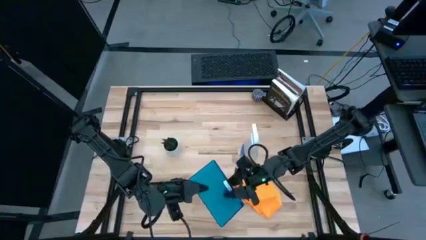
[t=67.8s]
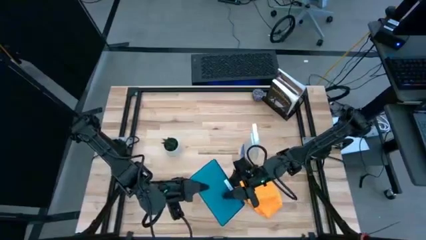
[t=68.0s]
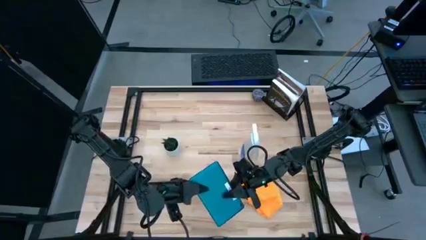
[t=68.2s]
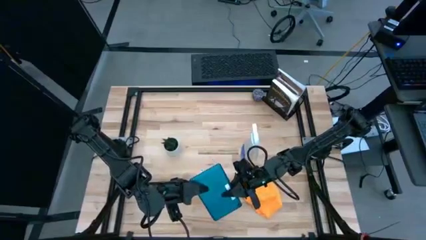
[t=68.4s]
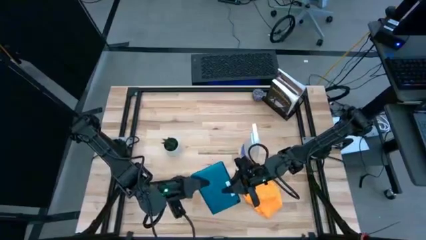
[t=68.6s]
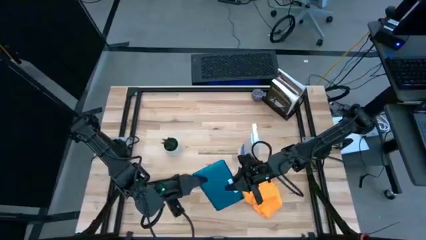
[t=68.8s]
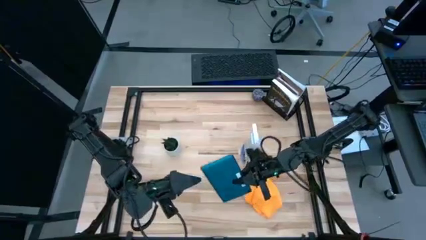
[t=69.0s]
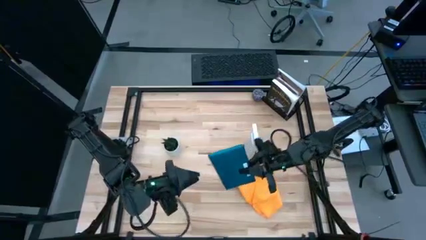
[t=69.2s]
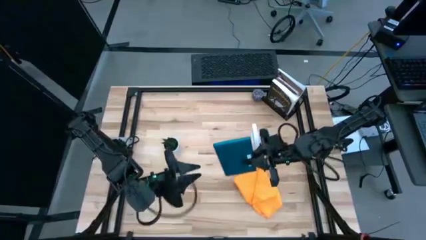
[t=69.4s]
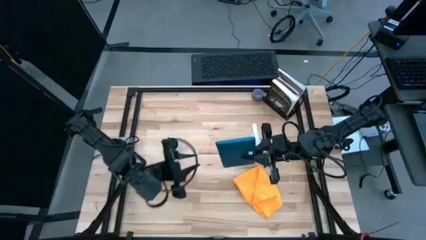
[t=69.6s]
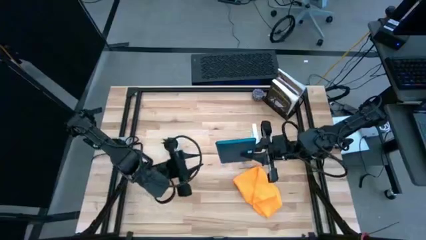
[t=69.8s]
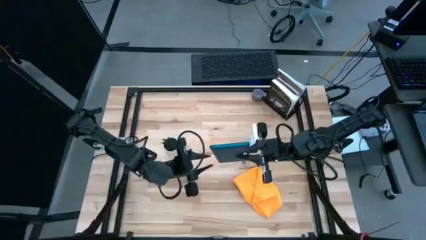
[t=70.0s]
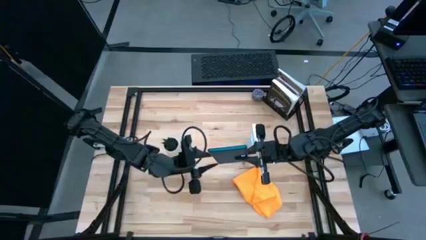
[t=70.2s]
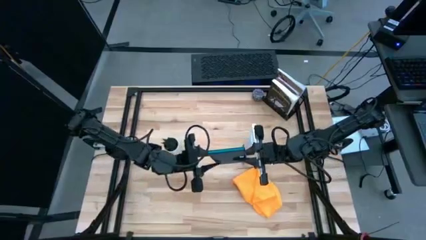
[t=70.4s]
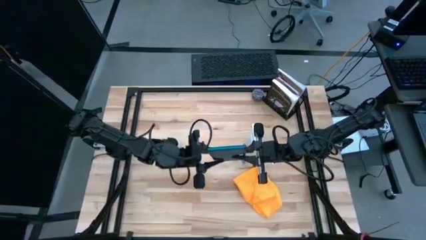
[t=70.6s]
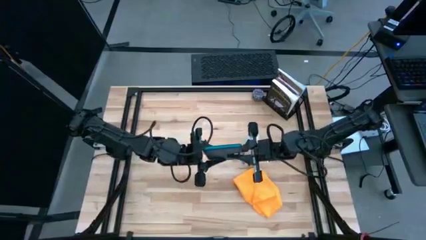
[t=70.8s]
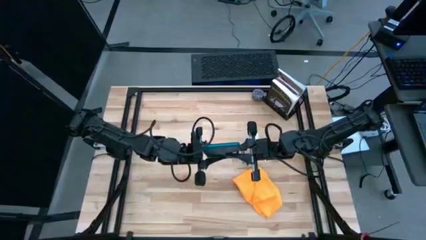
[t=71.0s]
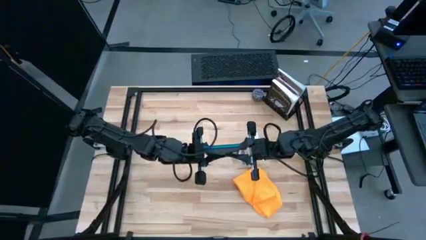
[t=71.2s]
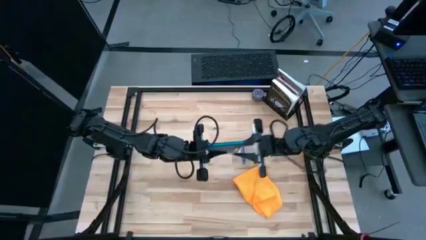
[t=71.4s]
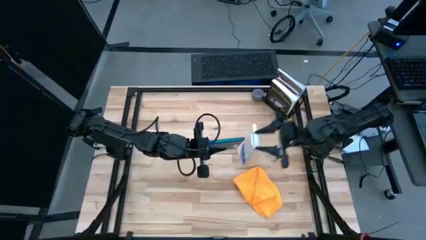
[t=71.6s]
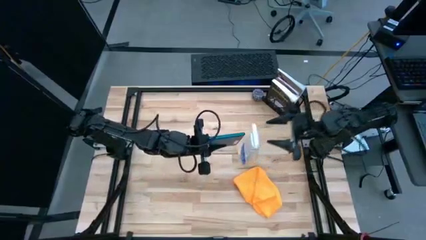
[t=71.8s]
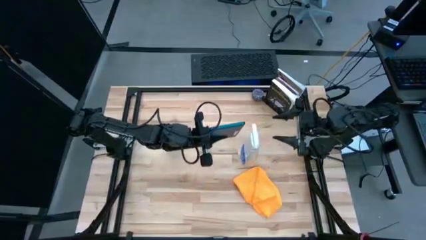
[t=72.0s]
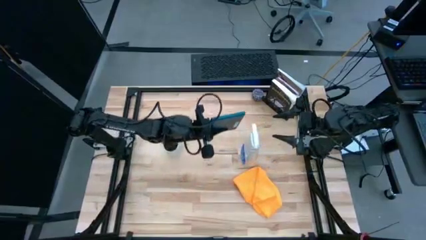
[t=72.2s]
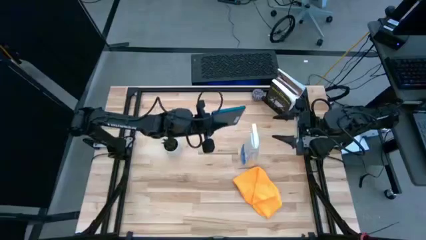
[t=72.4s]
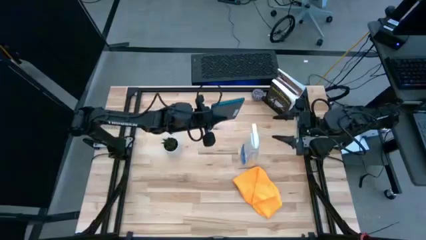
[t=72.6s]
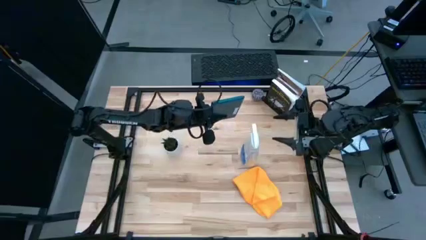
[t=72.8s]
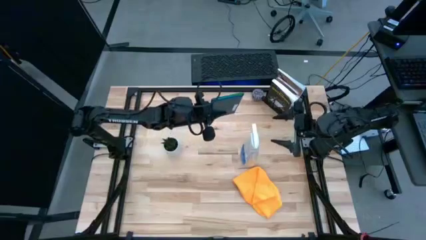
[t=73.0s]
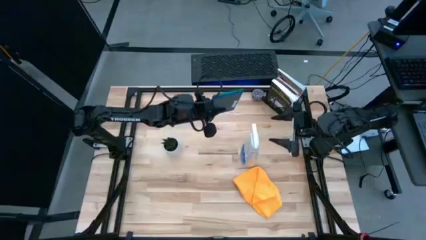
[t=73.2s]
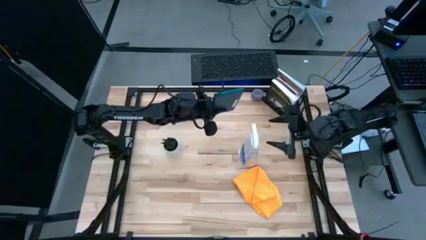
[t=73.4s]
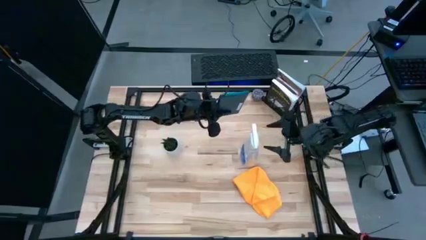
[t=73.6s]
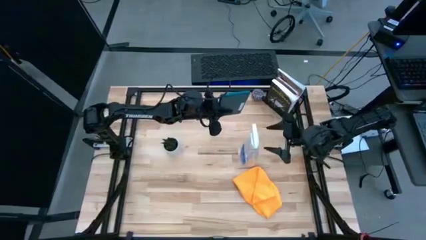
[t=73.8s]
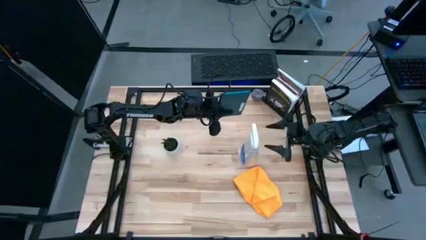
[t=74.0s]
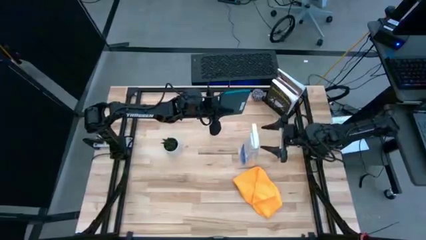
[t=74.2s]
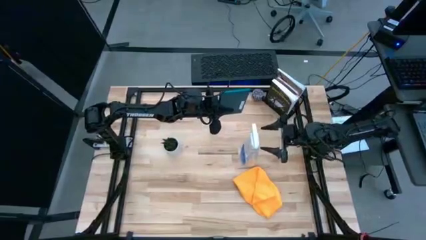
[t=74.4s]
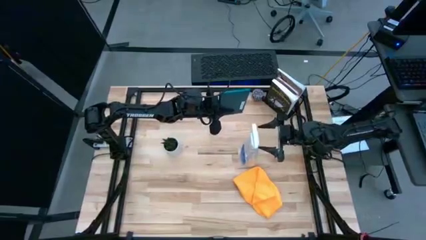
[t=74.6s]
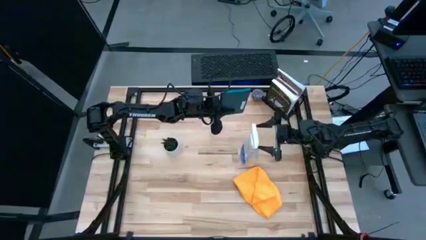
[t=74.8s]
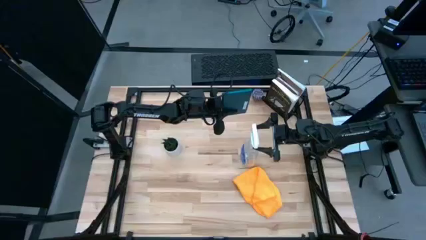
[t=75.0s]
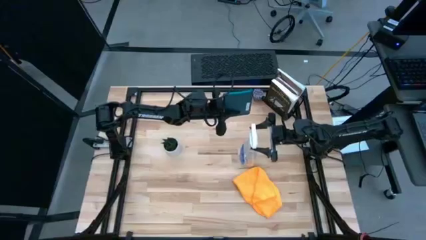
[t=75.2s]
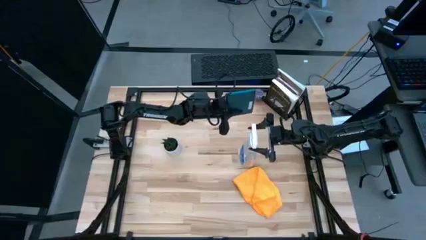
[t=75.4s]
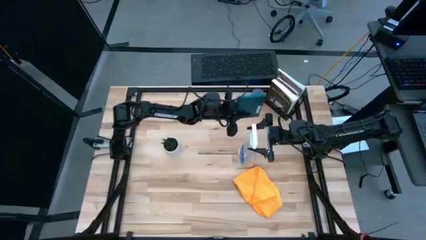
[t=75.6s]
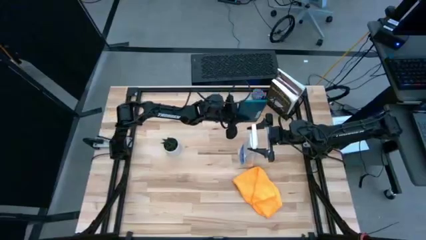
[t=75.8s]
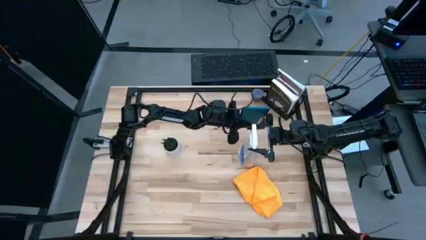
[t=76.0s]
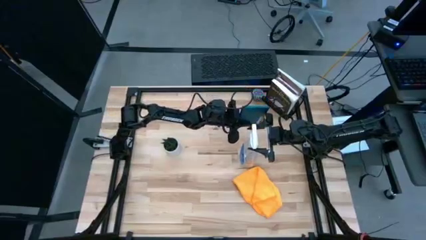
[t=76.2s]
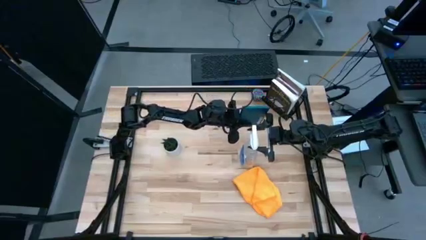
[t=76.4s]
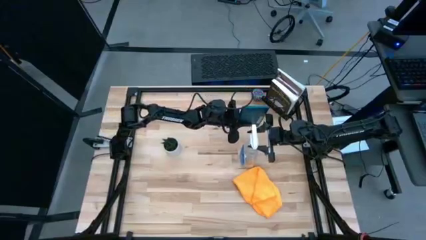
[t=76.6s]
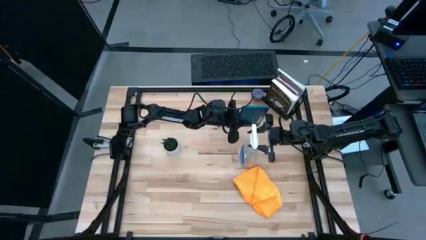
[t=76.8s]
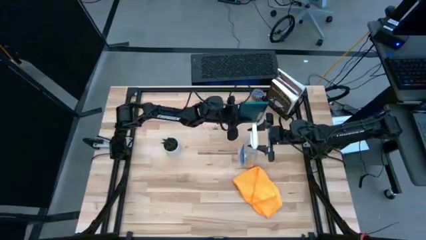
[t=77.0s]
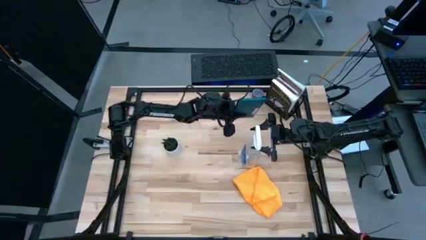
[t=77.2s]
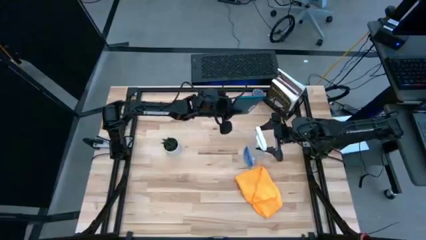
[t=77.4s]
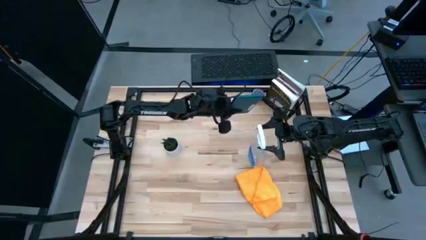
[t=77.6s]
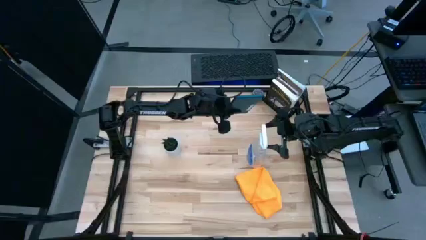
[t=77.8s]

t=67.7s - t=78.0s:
Task: Apply microfiber cloth
Spray the back of tablet using the spray bottle

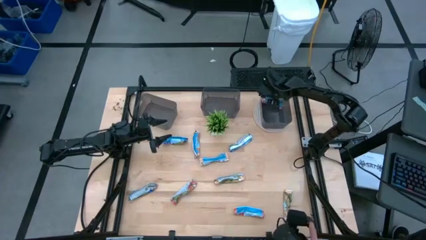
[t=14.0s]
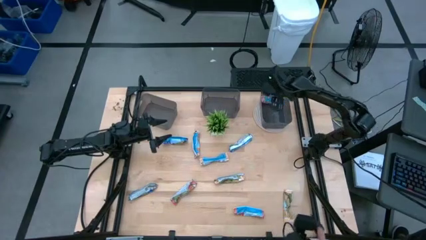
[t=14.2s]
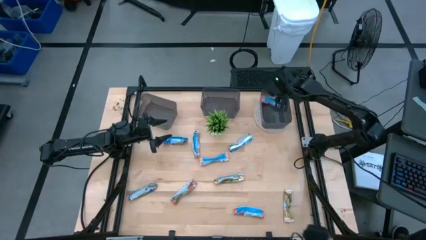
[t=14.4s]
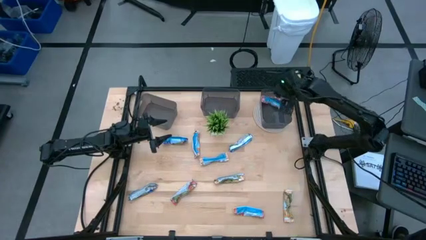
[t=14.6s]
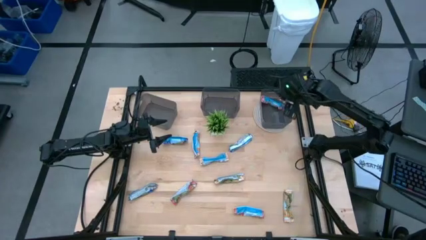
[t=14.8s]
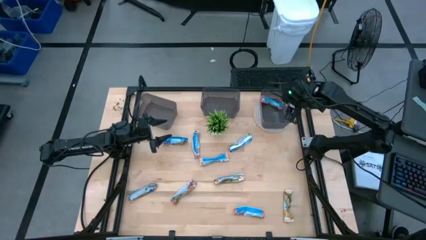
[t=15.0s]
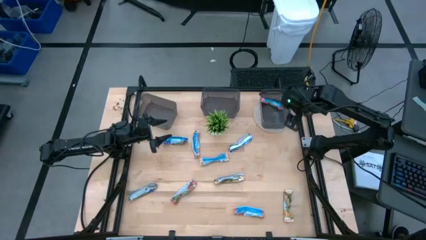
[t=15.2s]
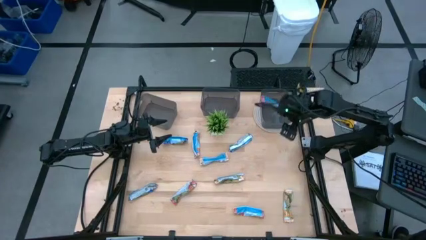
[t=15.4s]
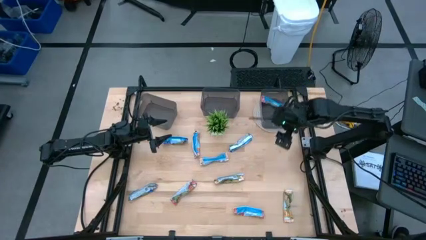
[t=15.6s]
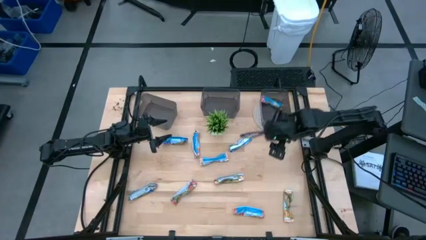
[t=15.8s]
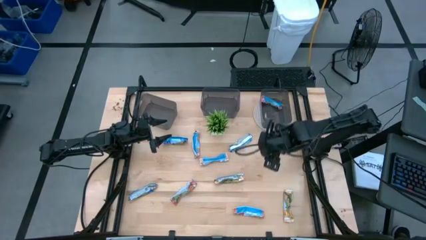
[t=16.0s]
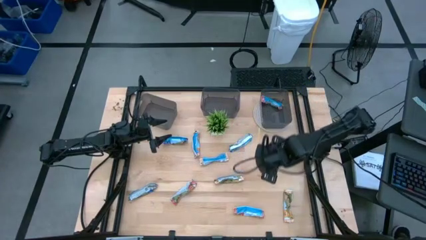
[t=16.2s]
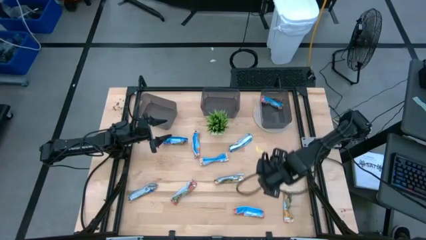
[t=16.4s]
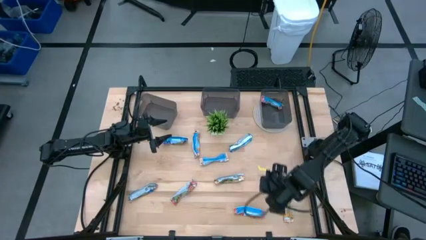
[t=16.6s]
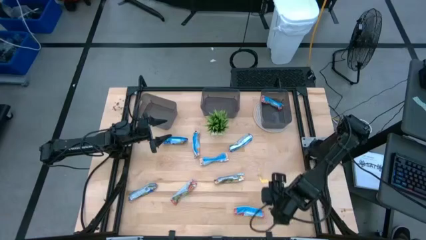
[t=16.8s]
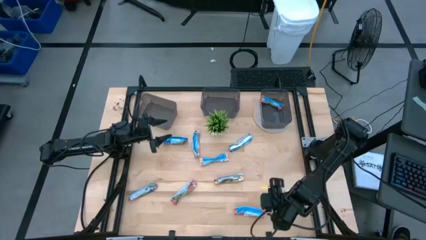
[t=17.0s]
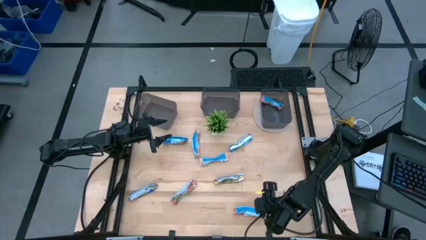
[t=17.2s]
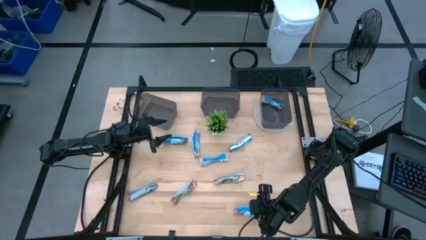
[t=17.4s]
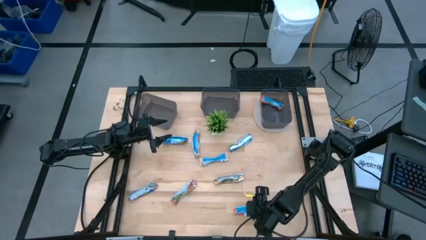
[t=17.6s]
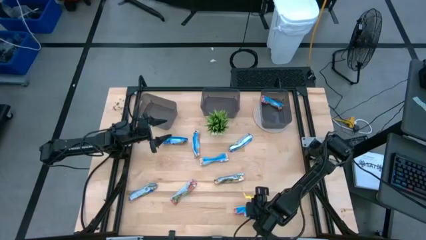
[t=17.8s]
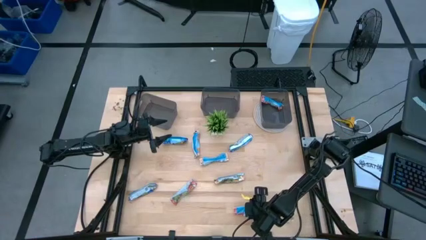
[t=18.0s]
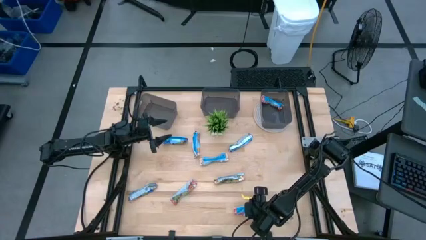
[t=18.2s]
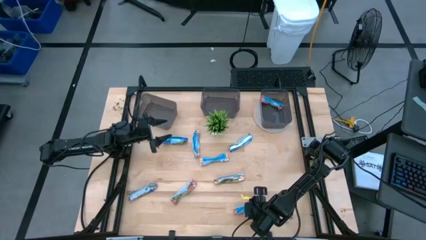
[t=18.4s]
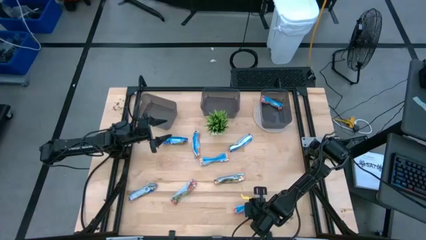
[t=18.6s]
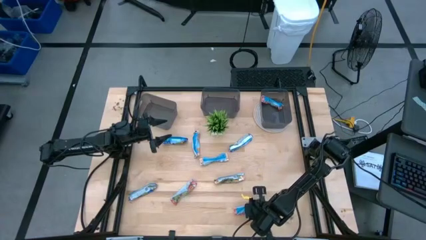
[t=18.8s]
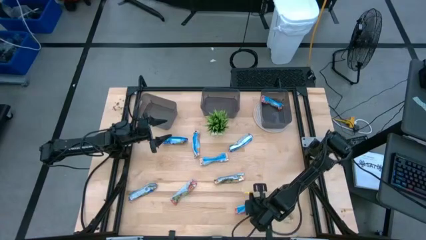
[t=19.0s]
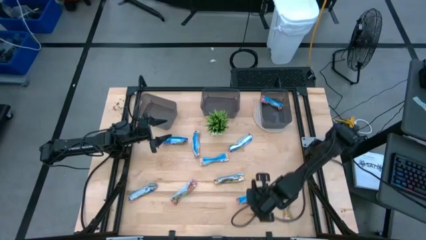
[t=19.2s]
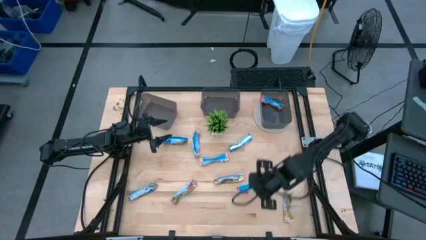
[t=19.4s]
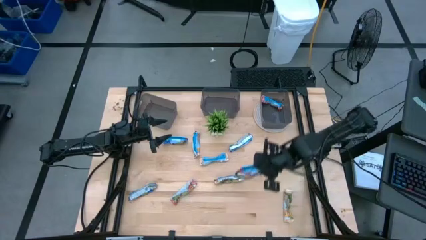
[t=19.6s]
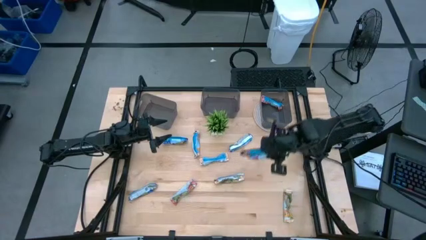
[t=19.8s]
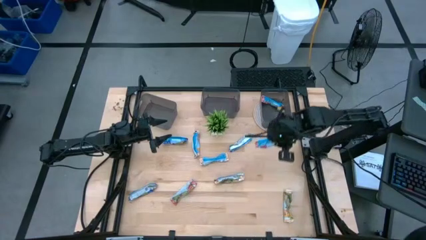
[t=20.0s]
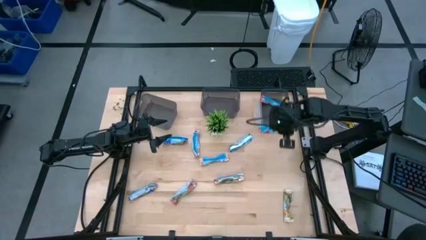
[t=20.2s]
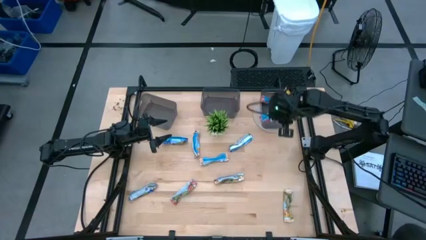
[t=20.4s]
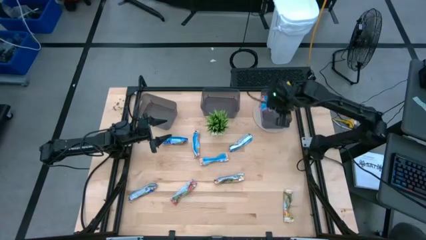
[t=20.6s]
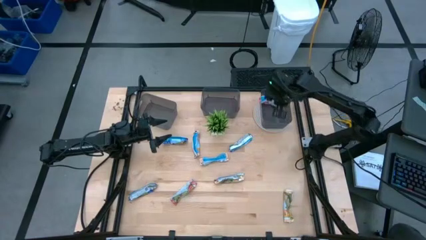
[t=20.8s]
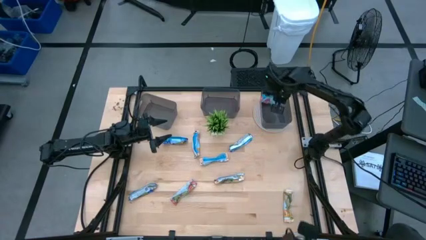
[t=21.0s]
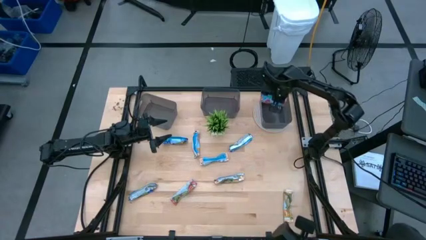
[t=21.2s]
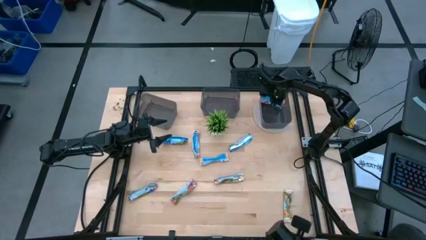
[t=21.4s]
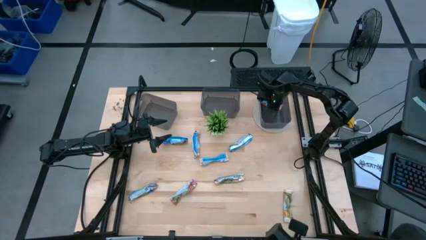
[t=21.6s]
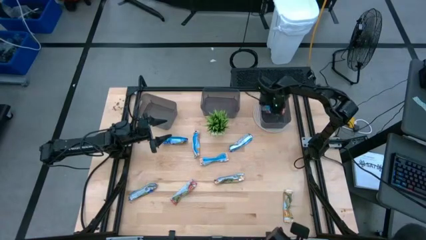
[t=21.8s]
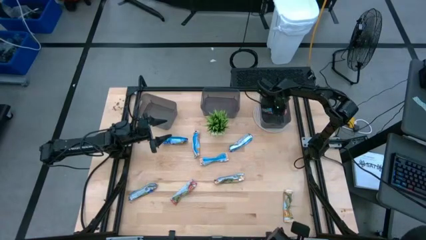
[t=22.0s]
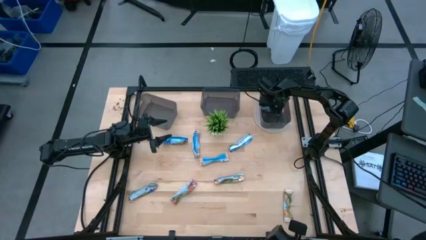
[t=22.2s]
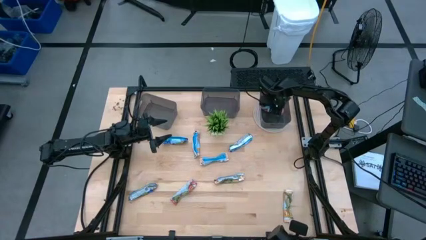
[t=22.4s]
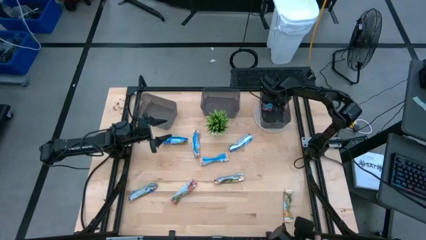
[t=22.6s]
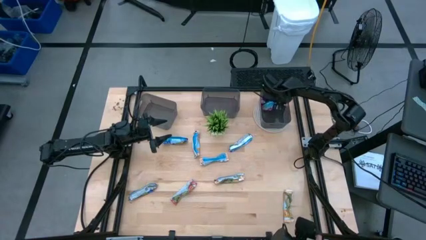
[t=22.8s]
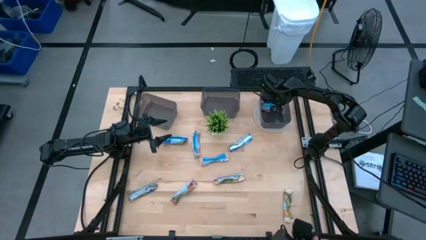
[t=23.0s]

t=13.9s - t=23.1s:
Task: Pick and place Granola Bars by type
Put the red granola bar into the right black bin
